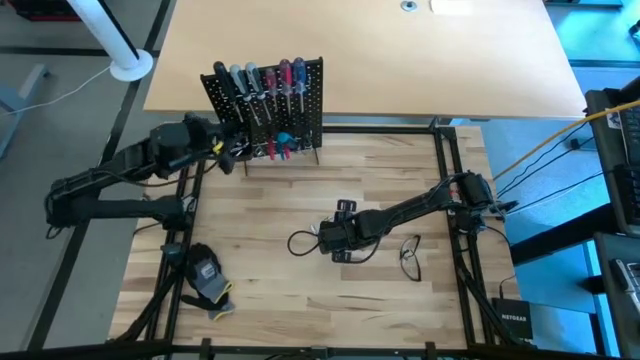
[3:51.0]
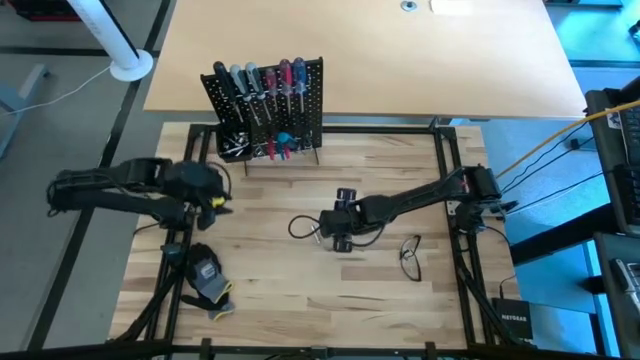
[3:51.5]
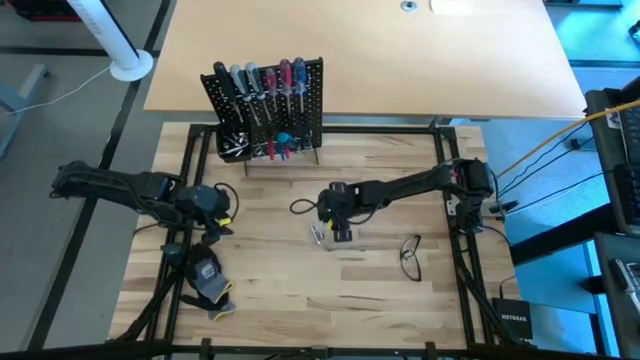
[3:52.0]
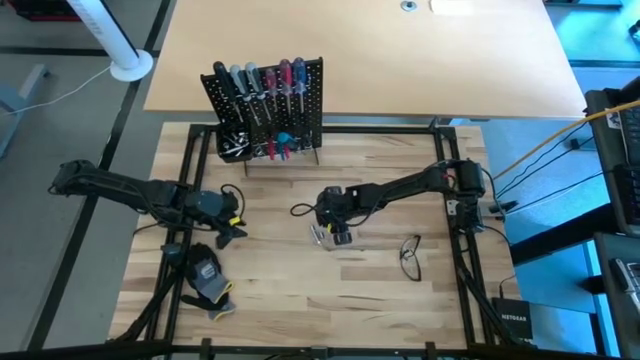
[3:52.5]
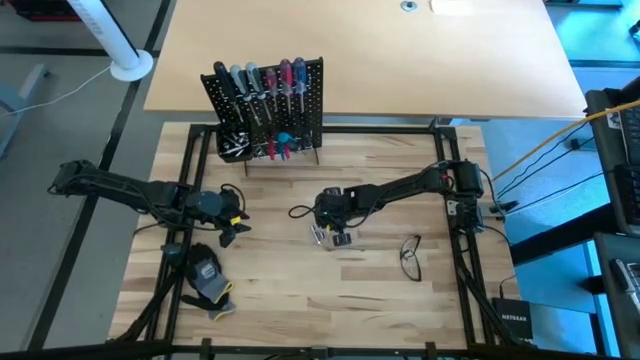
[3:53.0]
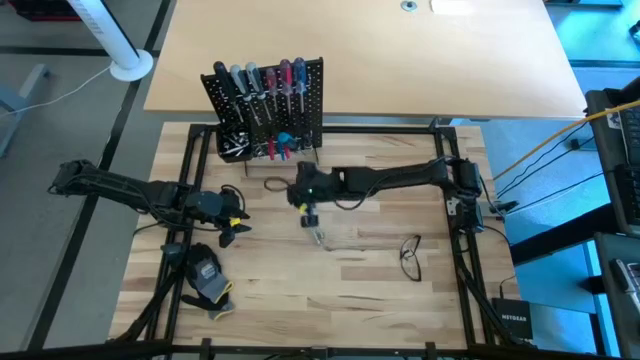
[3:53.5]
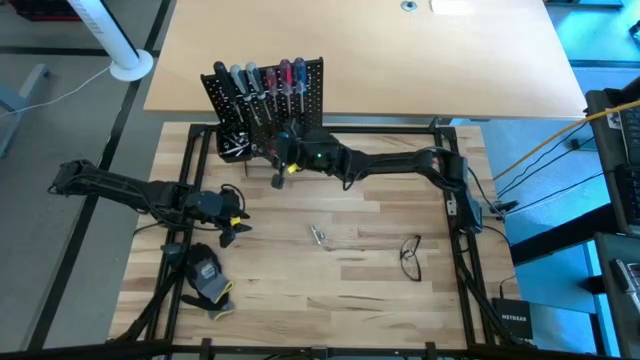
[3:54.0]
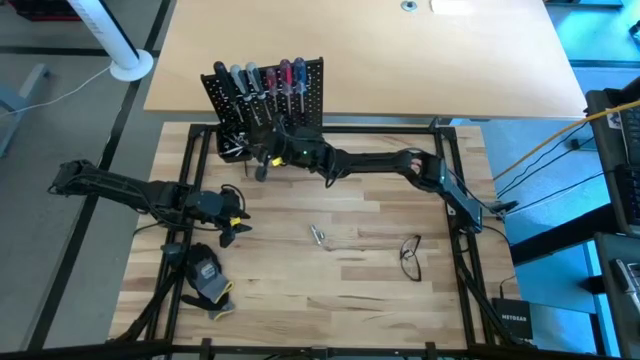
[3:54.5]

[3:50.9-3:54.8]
Task: Hang tools onto peg board
Put the socket into the black bin on the peg board

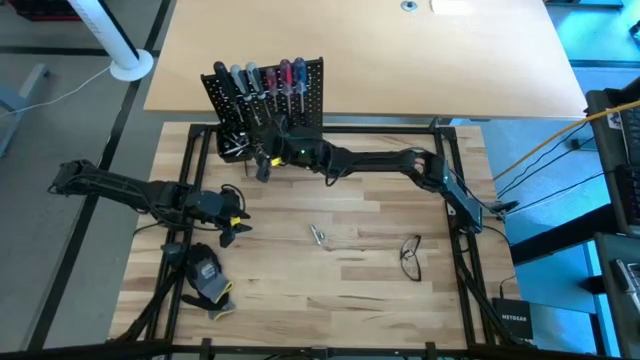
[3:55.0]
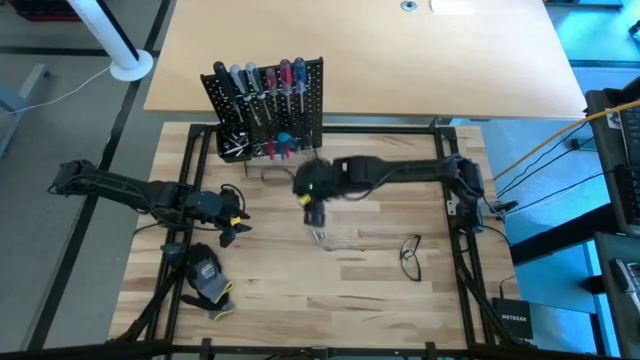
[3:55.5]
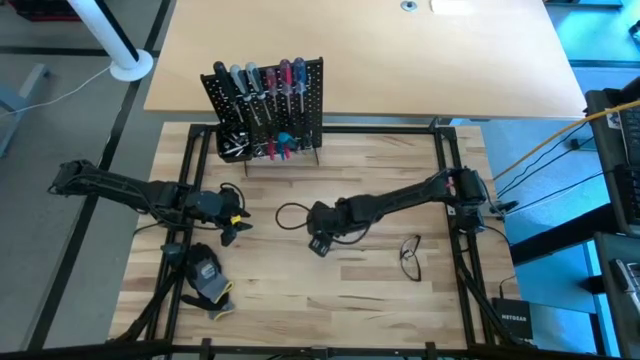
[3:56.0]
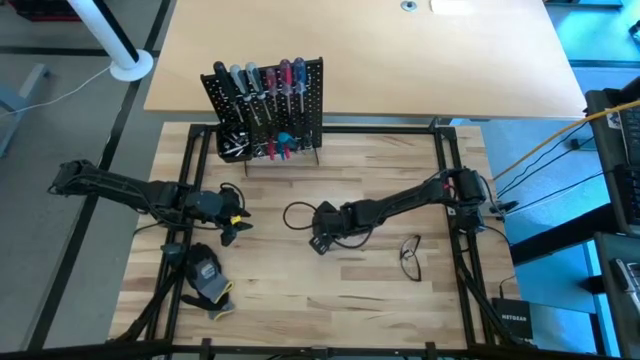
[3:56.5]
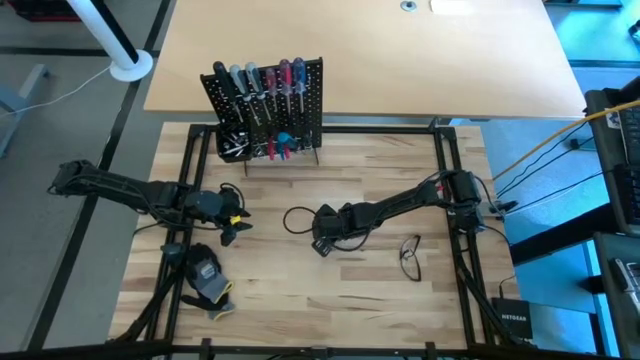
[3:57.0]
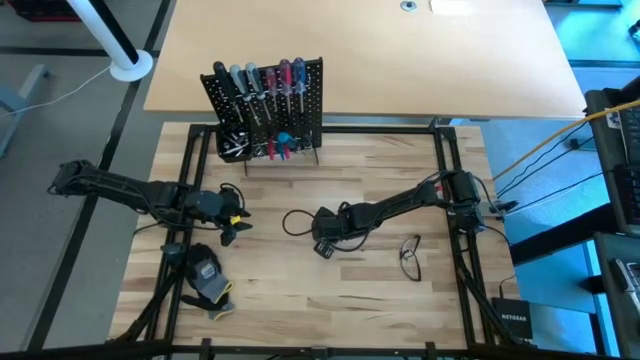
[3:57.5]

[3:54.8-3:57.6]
Put the socket into the black bin on the peg board

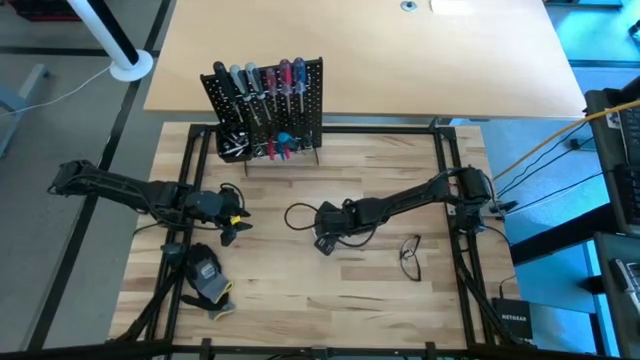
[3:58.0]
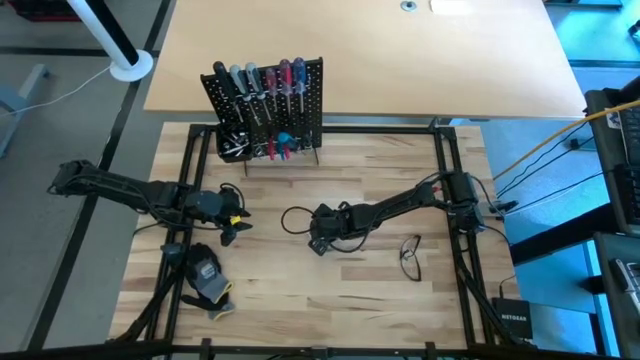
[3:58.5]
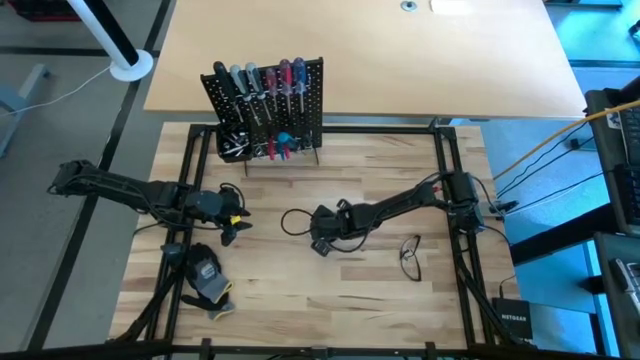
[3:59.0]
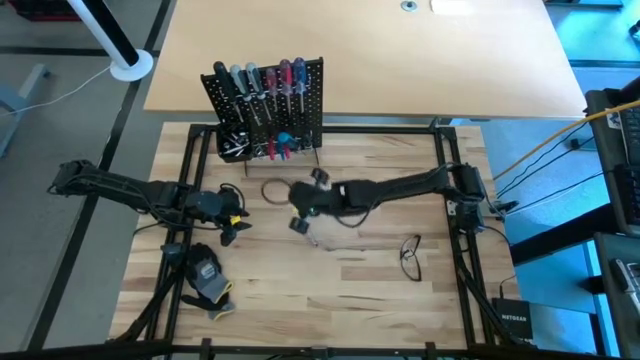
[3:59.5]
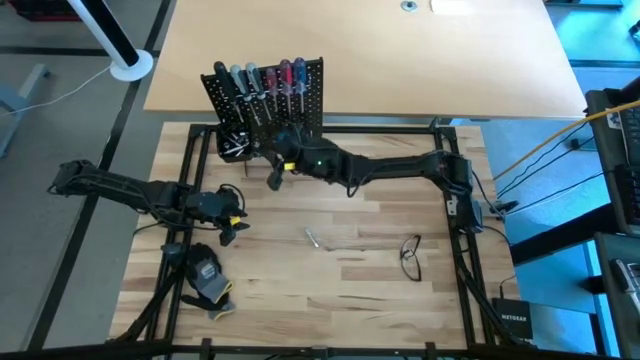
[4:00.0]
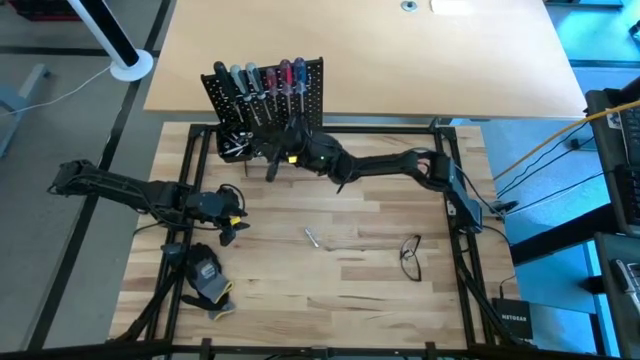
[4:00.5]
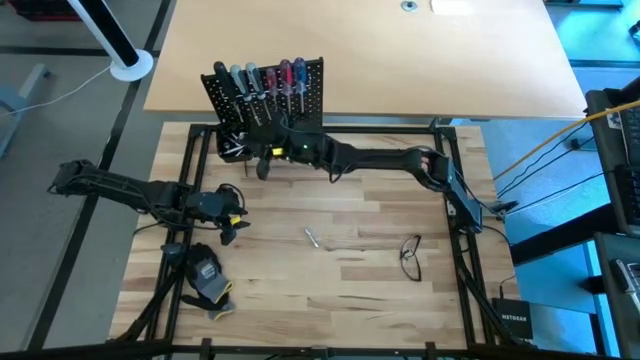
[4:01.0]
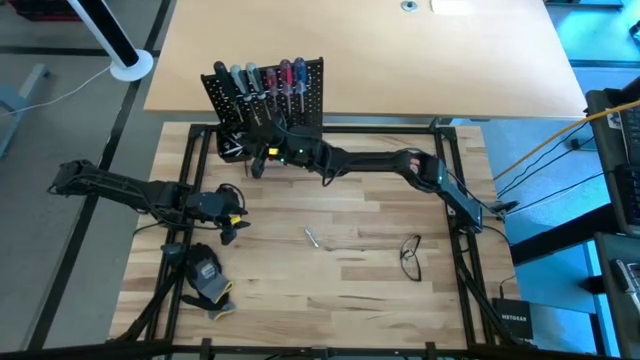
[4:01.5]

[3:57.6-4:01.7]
Put the socket into the black bin on the peg board

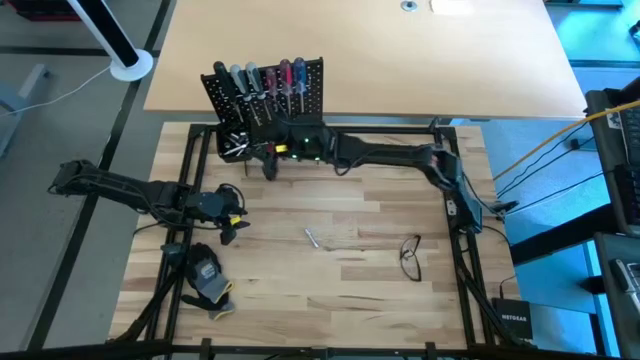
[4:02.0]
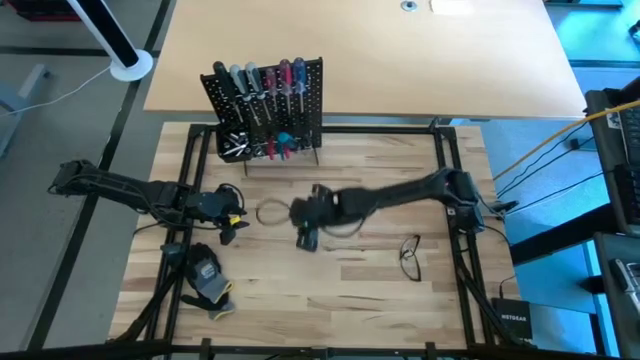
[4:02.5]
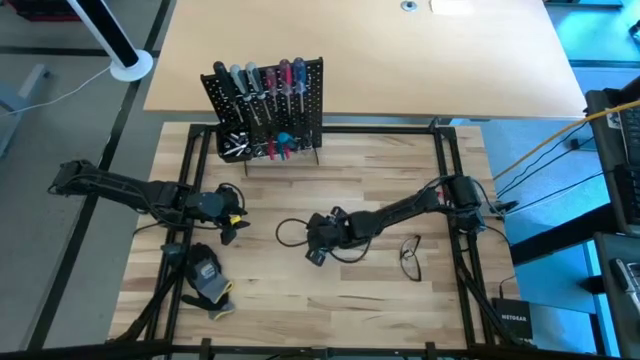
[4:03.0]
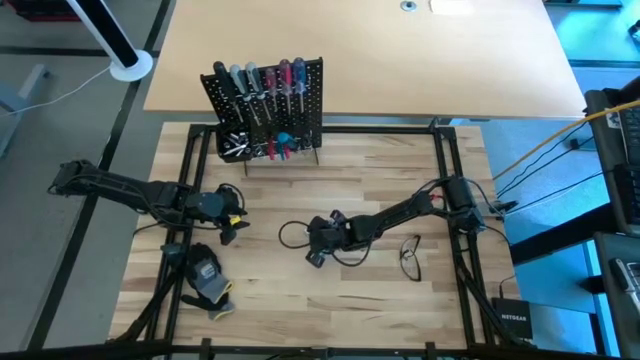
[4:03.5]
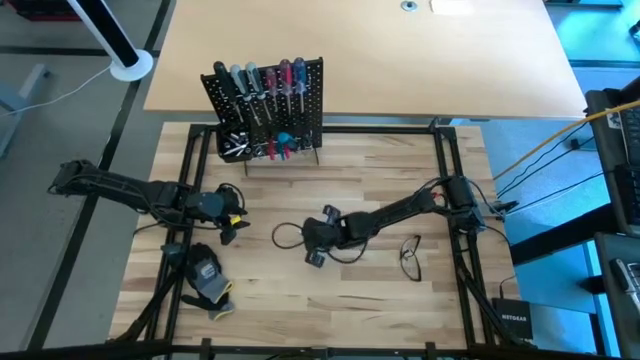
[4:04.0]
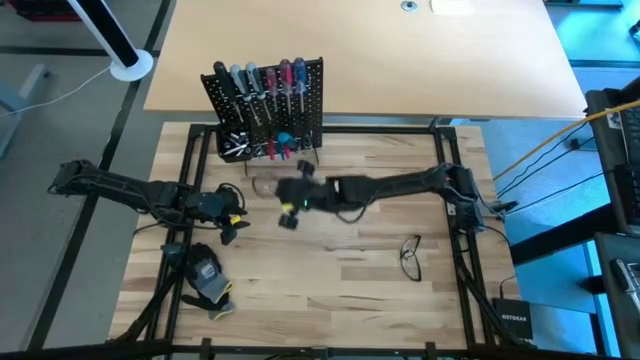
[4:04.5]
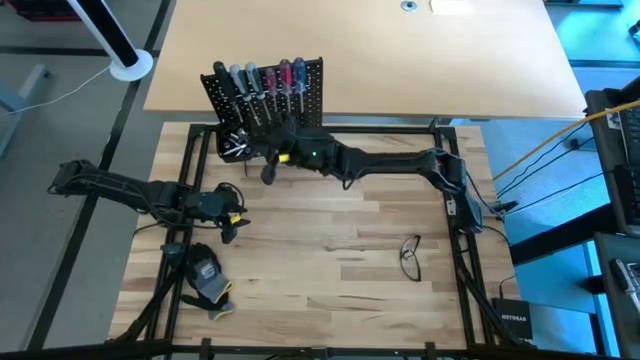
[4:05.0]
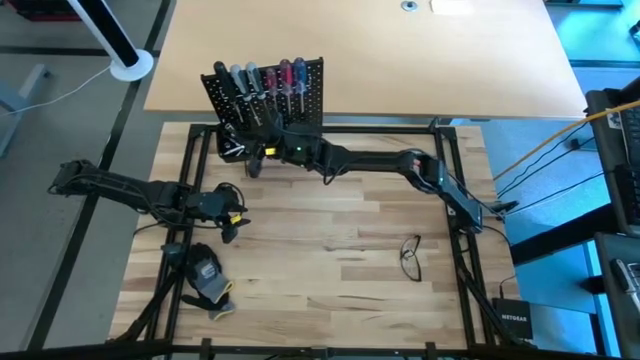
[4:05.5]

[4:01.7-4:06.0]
Put the extension bar into the black bin on the peg board

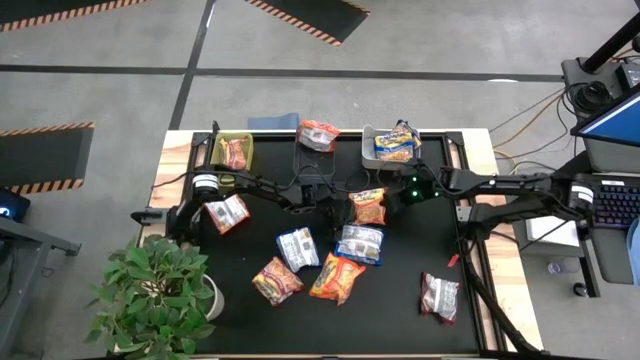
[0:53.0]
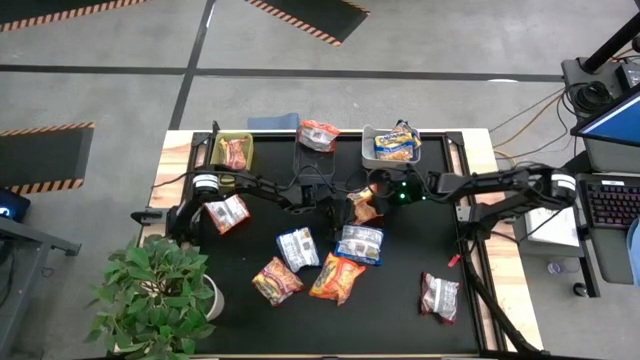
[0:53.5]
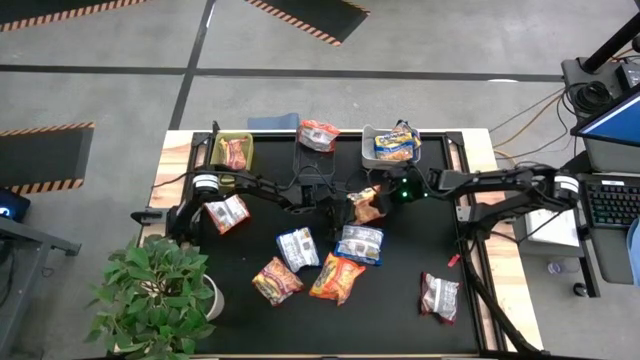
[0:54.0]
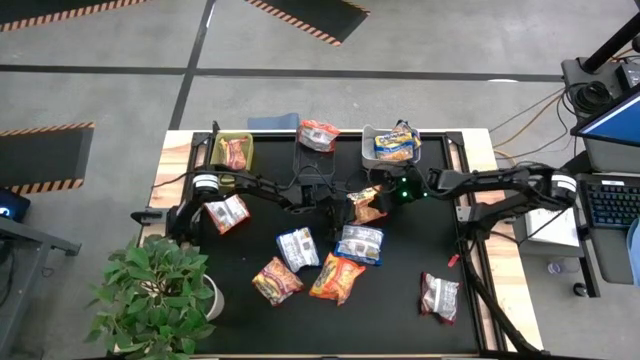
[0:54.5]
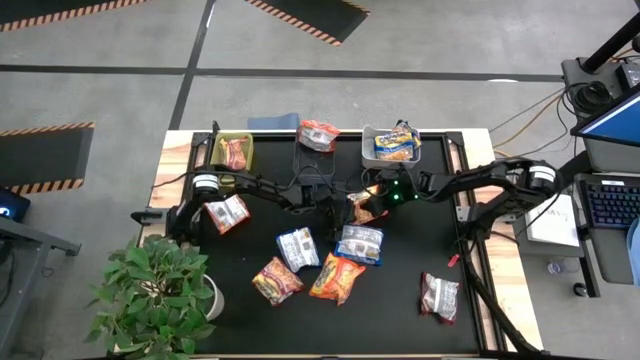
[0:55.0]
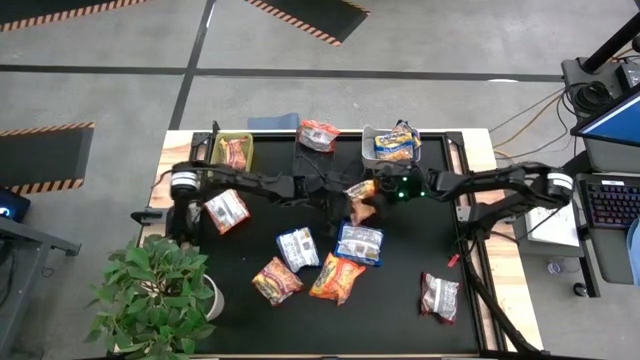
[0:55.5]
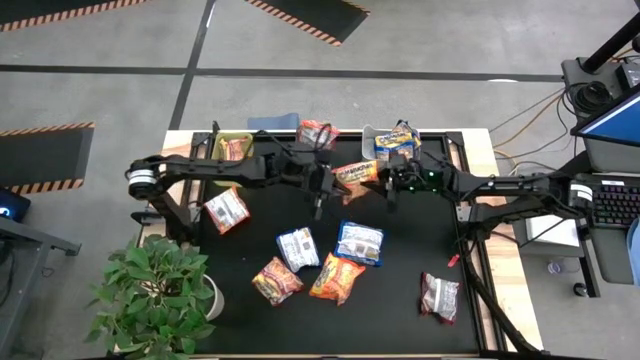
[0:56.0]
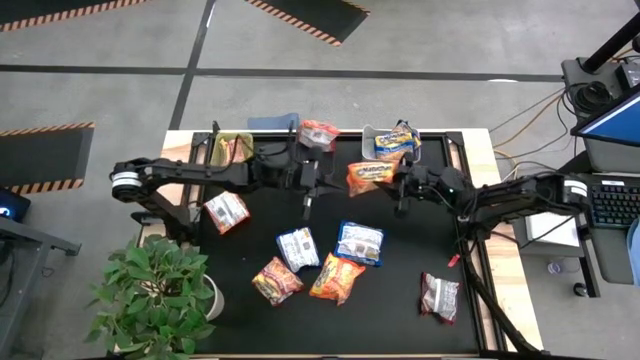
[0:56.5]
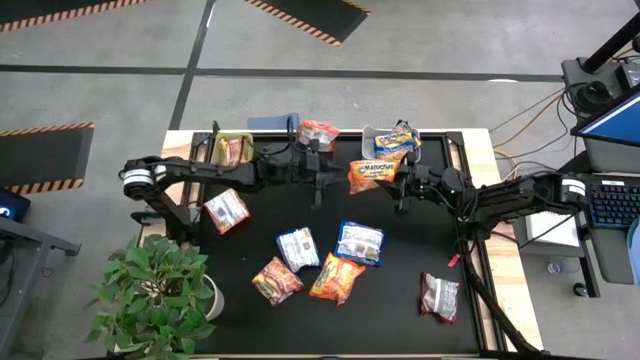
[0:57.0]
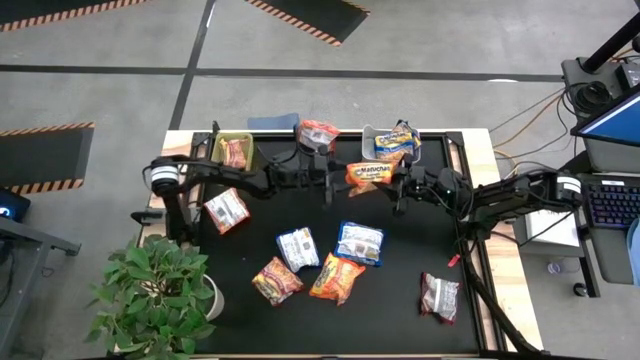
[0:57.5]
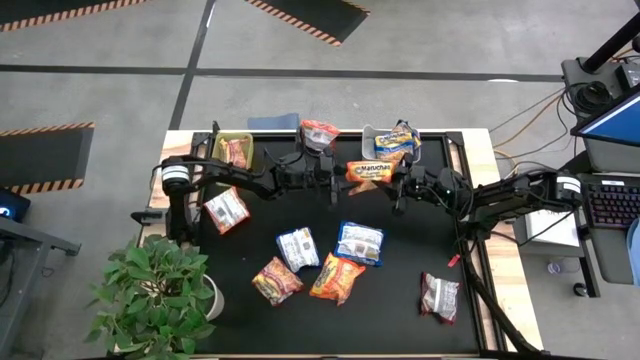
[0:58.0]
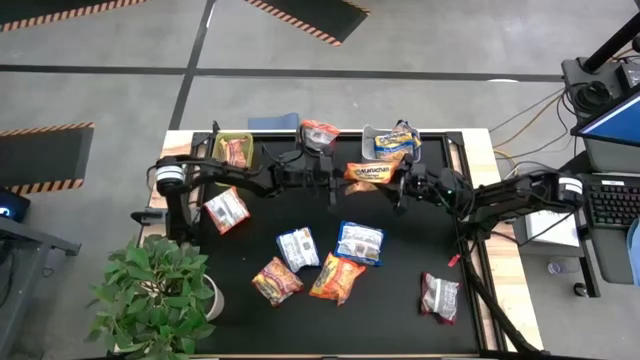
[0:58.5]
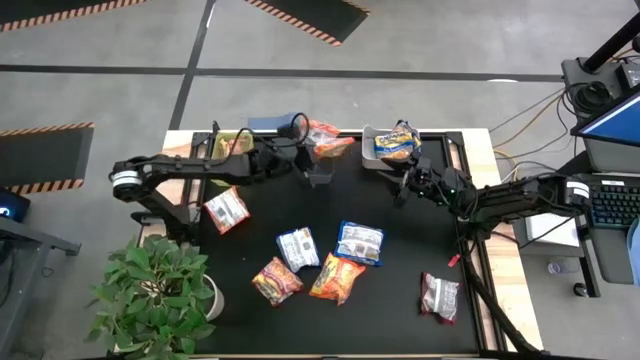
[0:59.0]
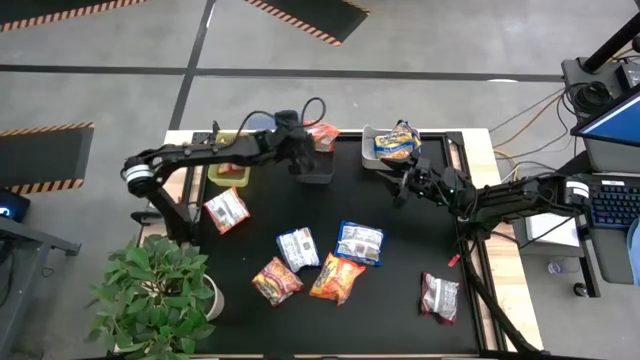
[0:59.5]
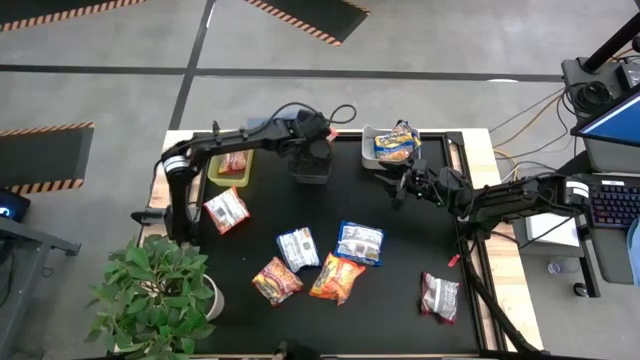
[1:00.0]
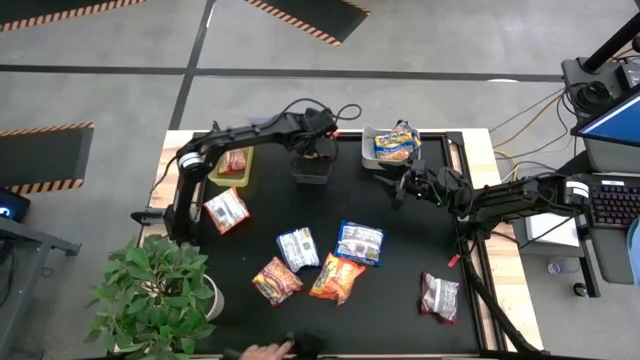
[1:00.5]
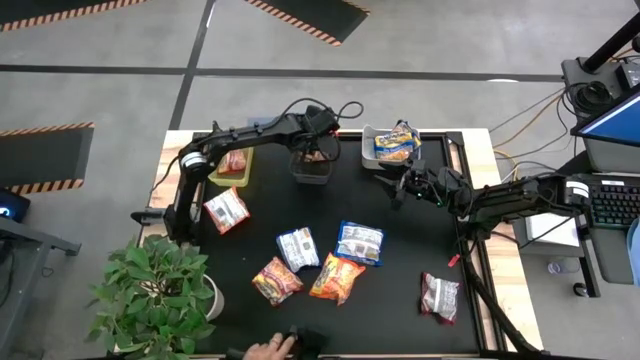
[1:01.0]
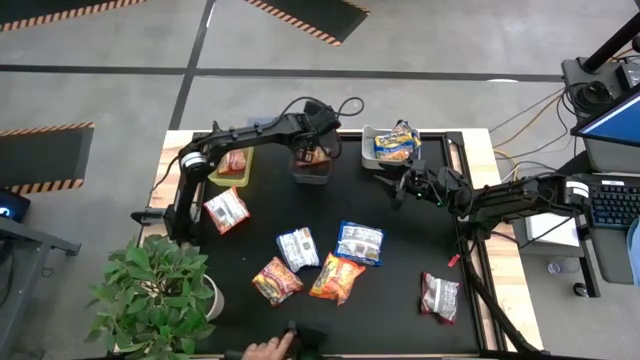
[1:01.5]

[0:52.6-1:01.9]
Task: Sort Maruchan noodles
Put the orange noodle pack into the black bin
